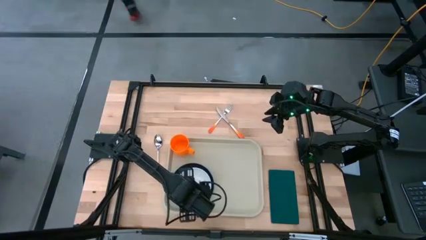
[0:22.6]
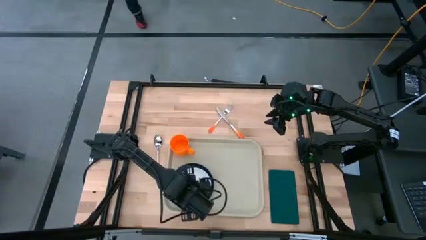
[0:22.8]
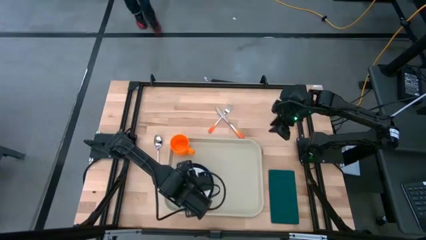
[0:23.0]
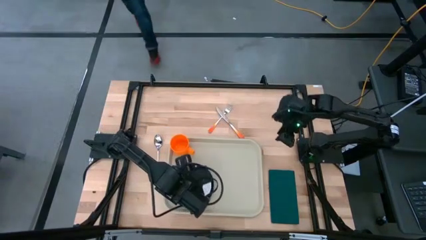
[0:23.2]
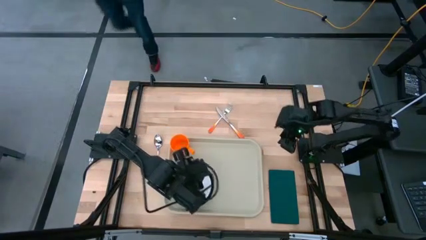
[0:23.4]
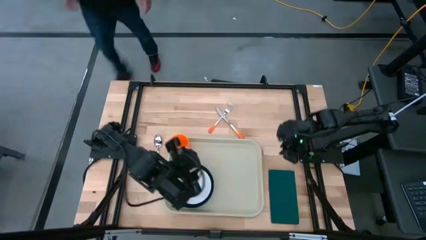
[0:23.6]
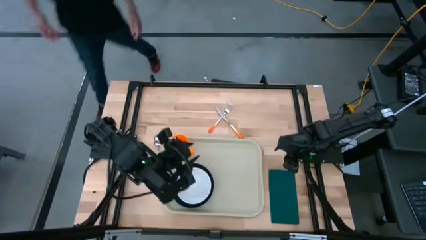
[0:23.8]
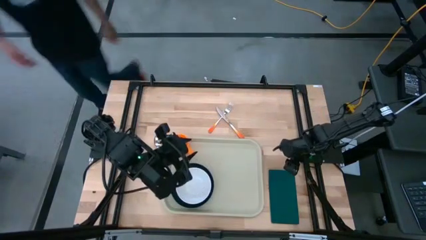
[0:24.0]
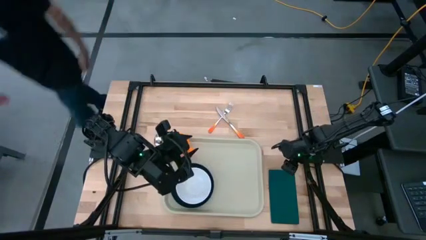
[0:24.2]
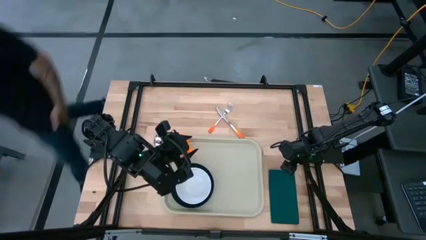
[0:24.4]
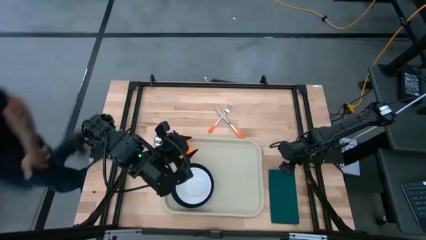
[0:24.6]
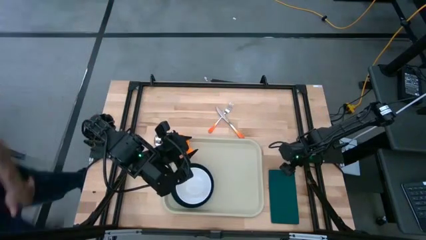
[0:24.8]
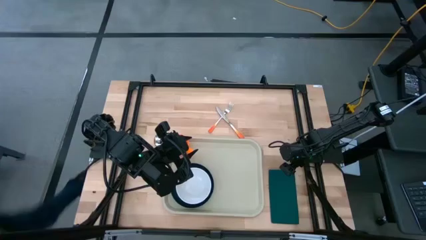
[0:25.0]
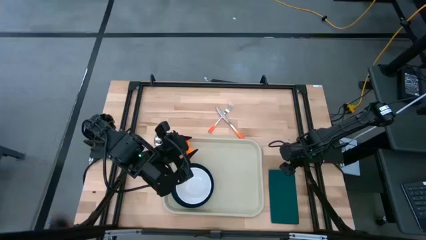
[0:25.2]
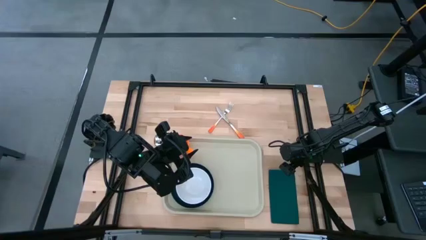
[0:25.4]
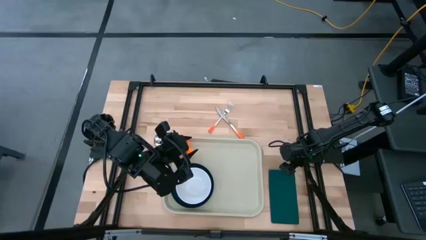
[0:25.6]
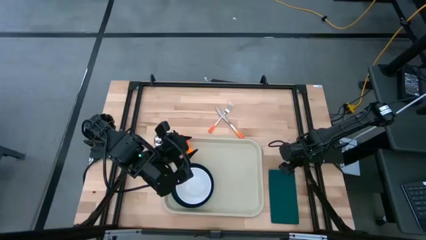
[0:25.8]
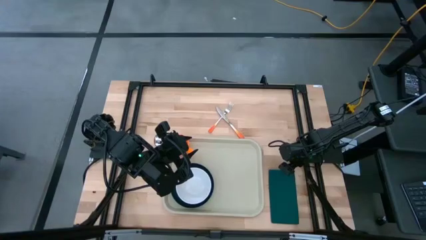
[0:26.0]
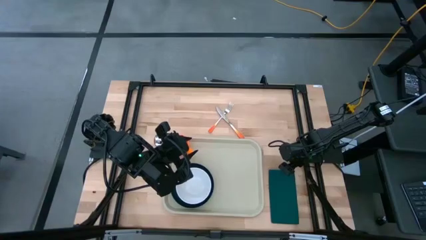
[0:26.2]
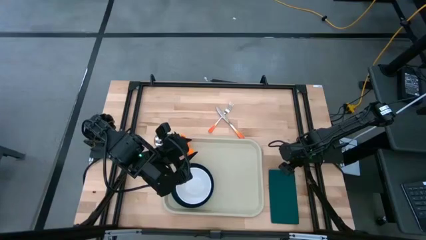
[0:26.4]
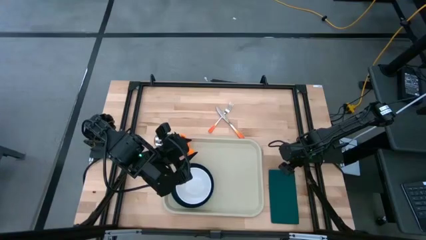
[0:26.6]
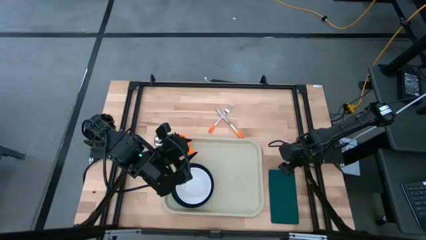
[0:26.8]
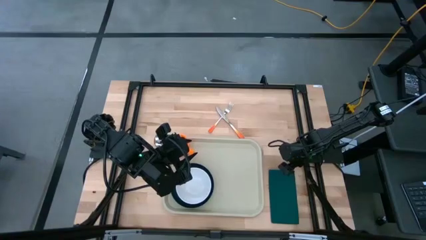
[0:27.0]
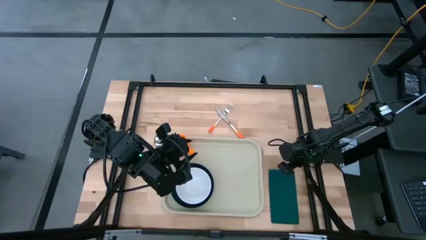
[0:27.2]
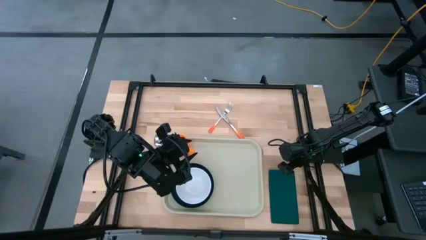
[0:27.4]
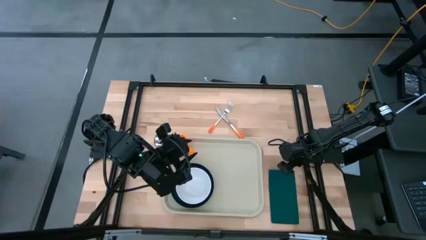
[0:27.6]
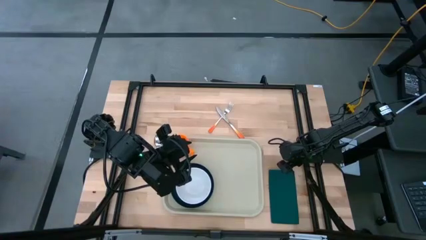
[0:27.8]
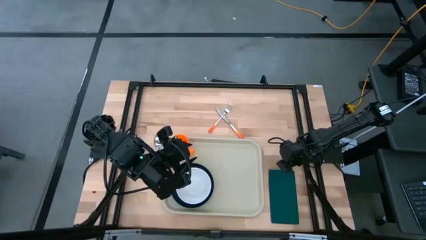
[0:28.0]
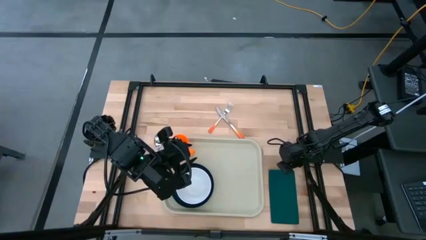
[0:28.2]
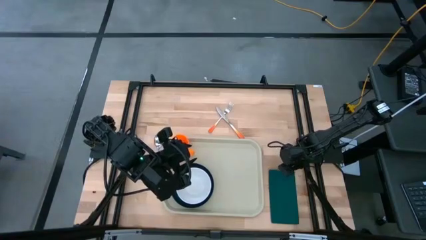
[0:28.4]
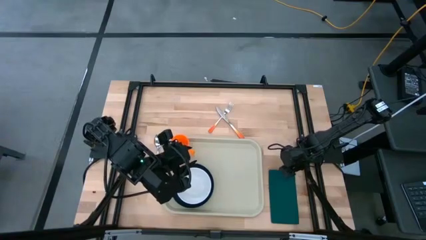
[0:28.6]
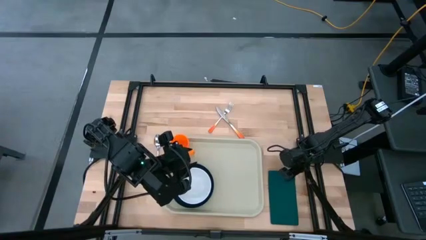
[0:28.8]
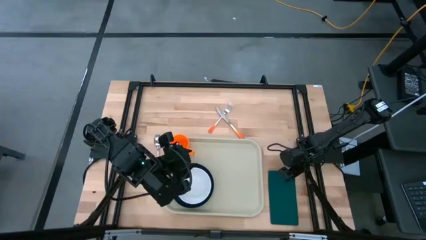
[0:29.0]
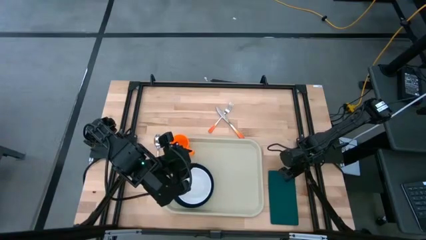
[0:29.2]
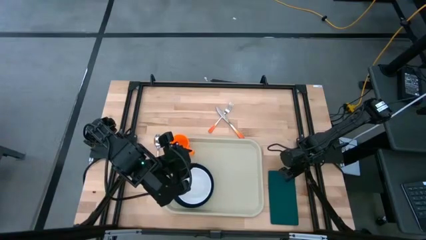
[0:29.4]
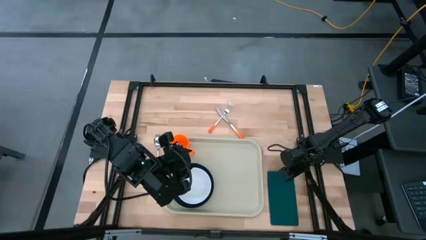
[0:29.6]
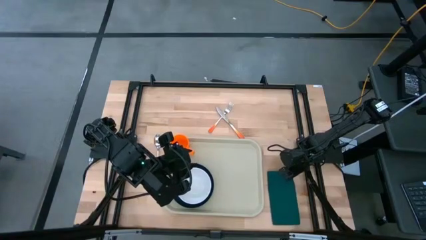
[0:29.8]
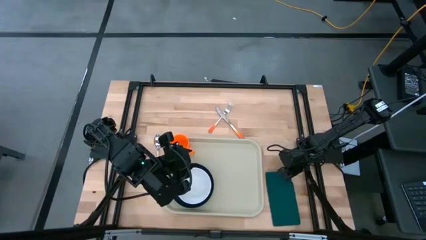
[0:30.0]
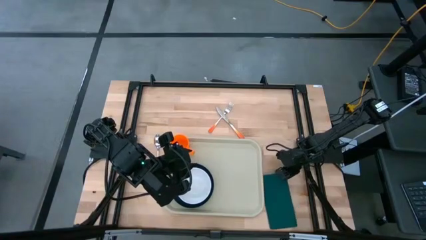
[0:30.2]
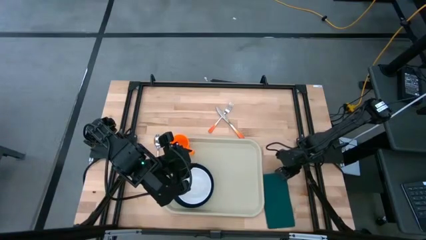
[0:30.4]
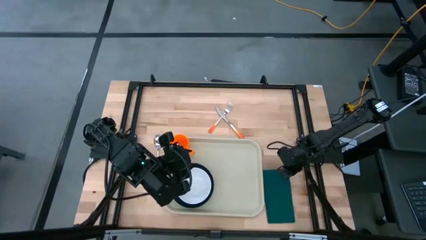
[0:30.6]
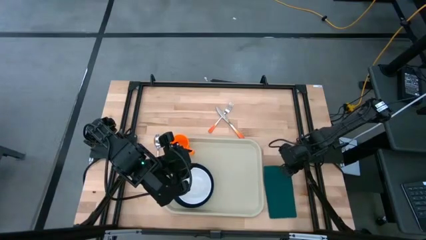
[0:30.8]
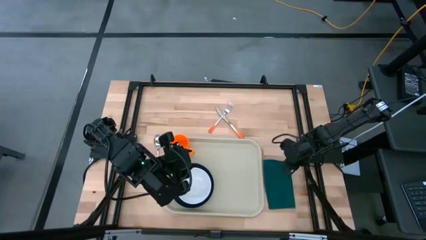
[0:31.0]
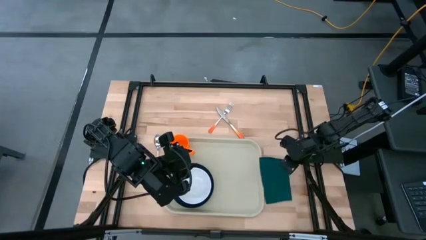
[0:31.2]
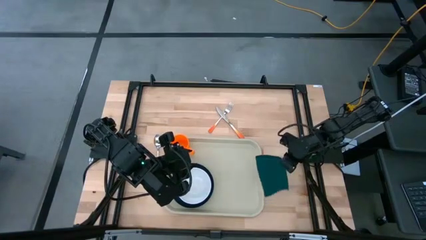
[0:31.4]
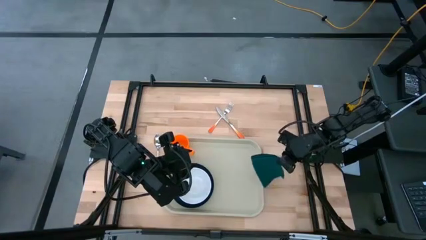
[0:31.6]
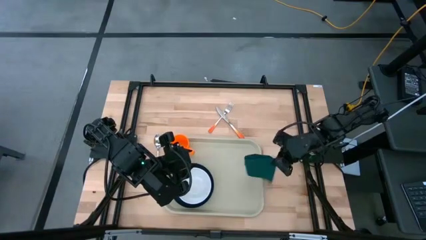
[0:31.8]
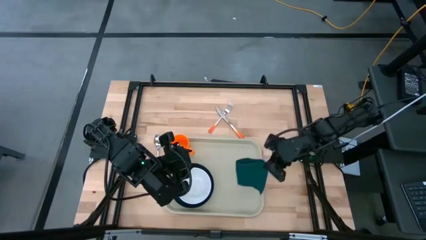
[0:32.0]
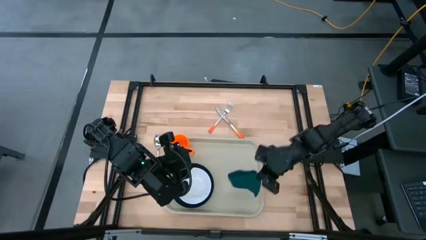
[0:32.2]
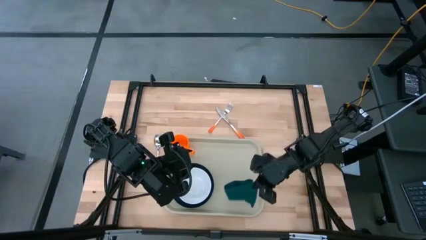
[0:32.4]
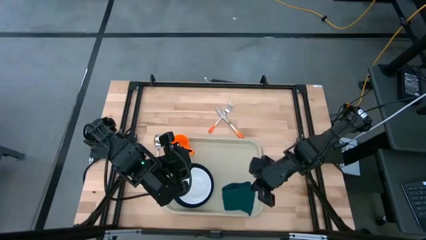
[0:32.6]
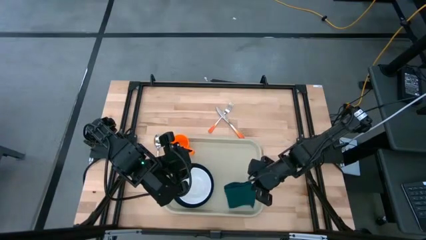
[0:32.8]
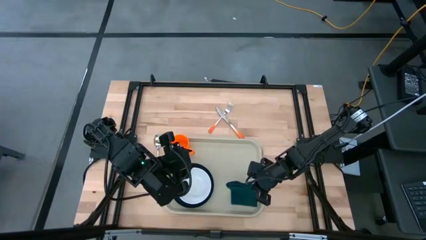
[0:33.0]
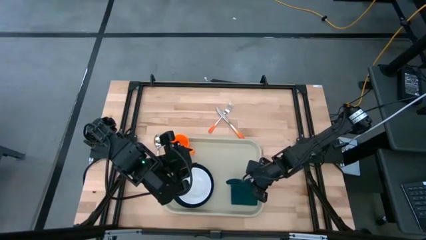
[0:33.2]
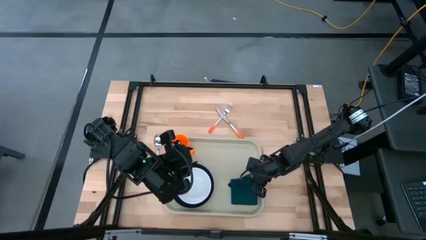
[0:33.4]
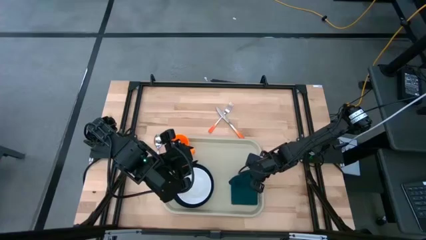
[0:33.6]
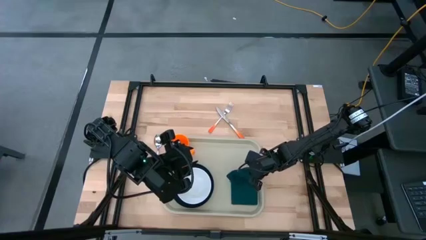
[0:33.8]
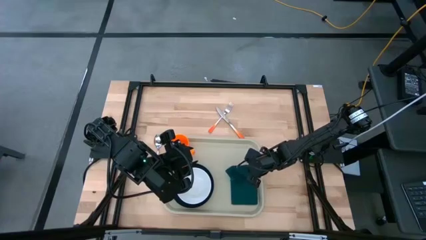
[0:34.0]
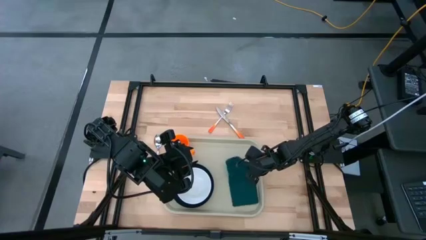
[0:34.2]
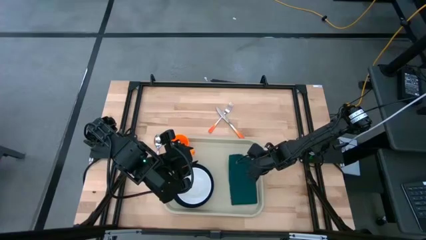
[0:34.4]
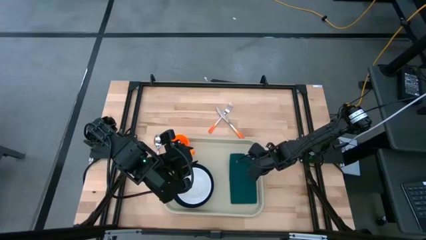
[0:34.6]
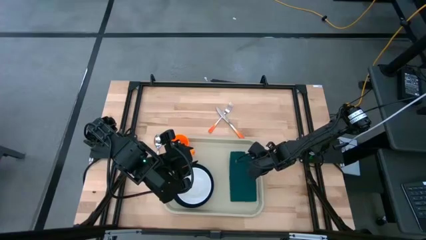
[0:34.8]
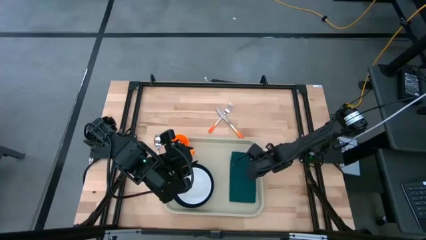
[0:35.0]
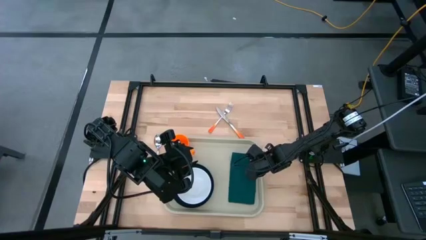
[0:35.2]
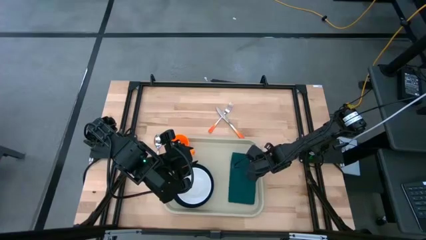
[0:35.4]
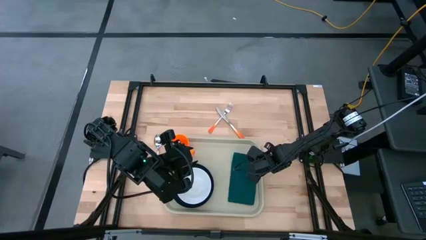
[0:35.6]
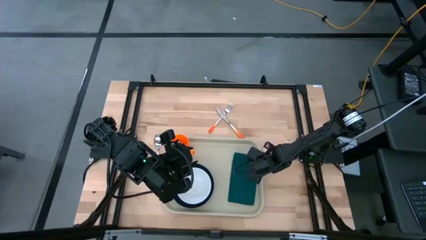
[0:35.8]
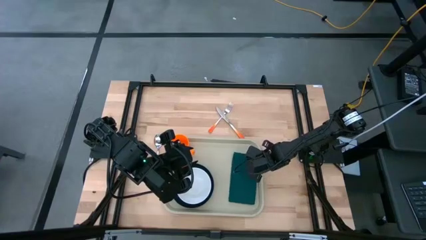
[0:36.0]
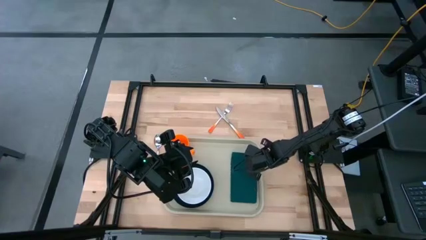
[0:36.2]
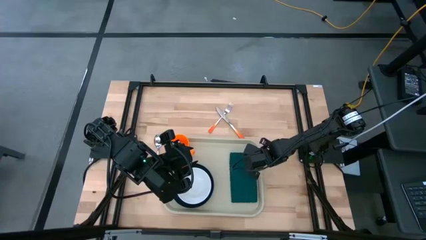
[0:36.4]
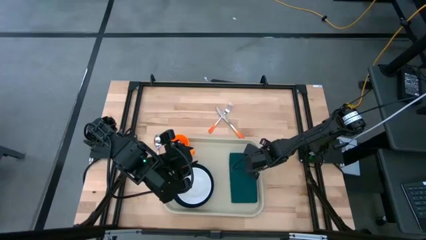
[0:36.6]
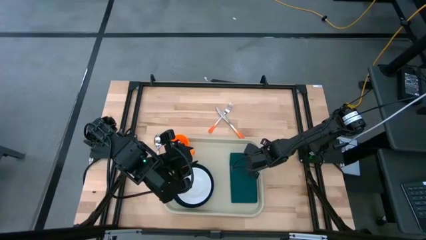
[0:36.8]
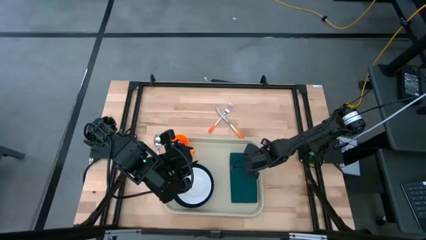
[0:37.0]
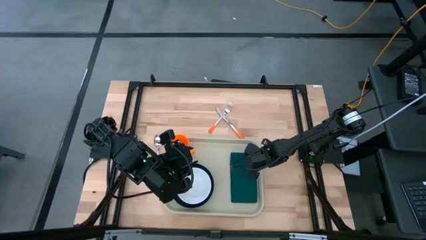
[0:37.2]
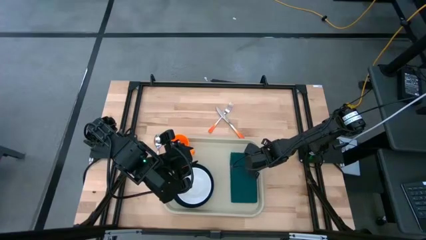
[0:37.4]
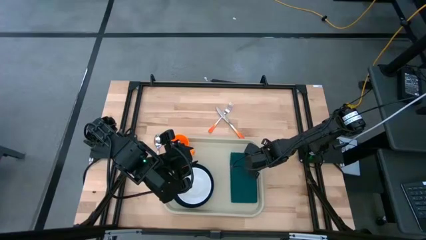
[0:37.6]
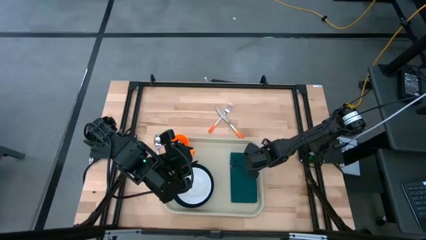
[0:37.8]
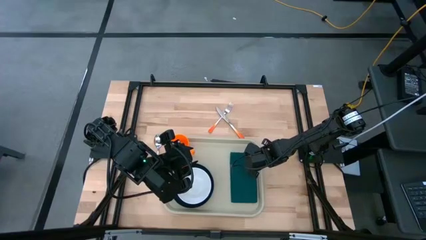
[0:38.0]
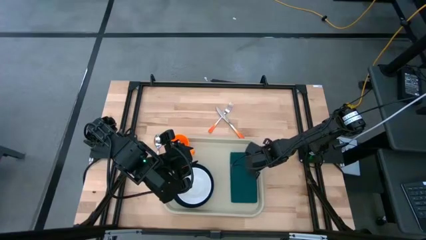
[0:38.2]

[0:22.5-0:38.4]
Task: Set up tray
Put the green napkin on the brown tray
